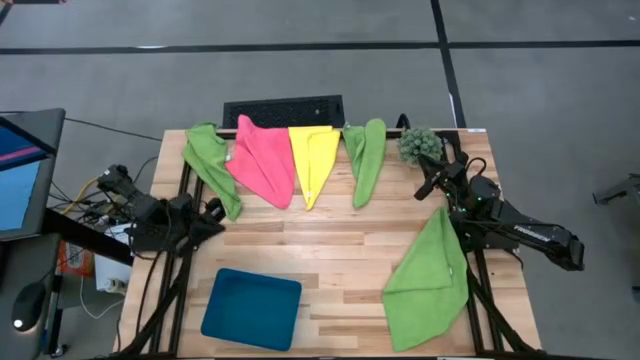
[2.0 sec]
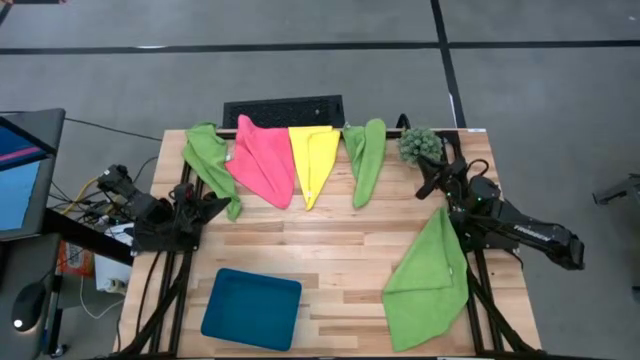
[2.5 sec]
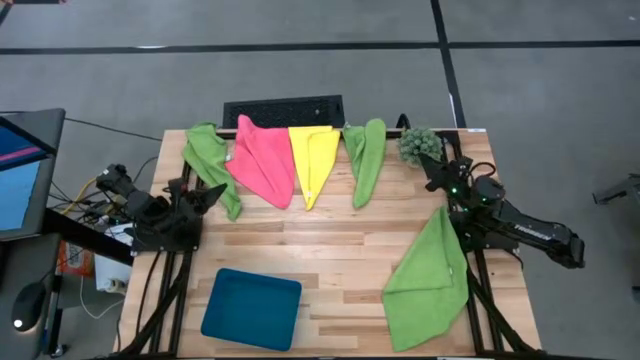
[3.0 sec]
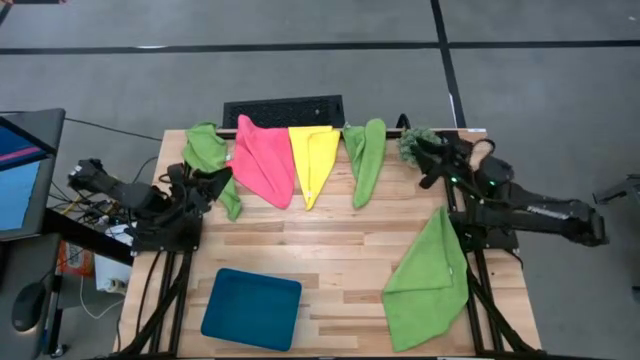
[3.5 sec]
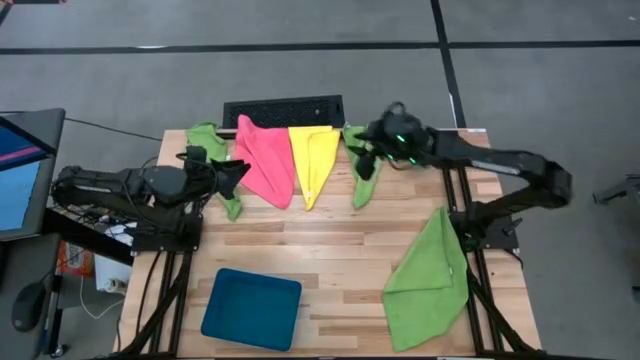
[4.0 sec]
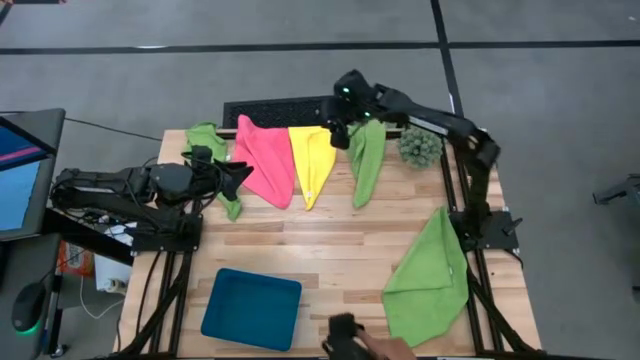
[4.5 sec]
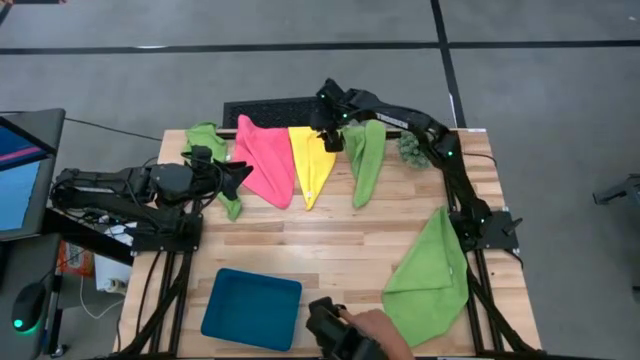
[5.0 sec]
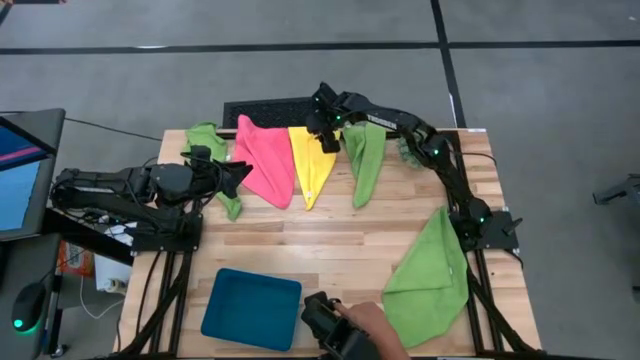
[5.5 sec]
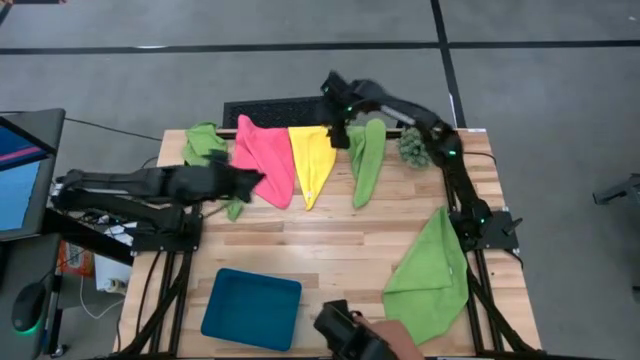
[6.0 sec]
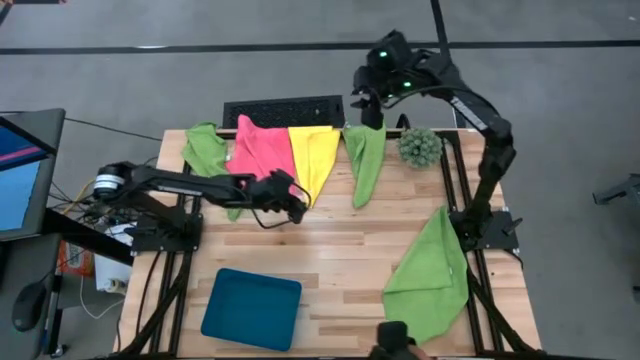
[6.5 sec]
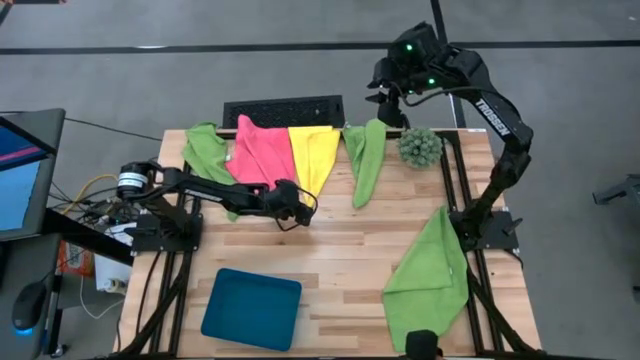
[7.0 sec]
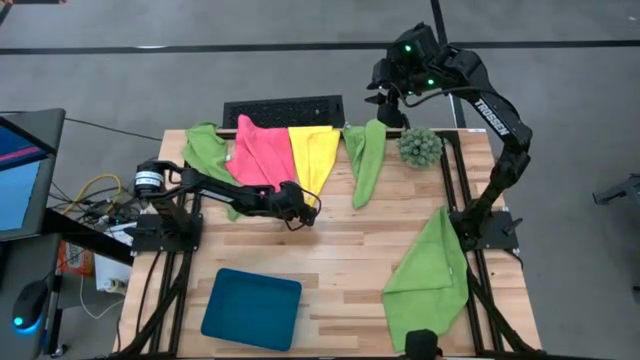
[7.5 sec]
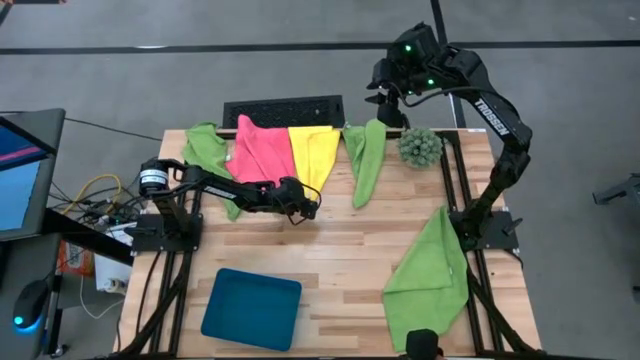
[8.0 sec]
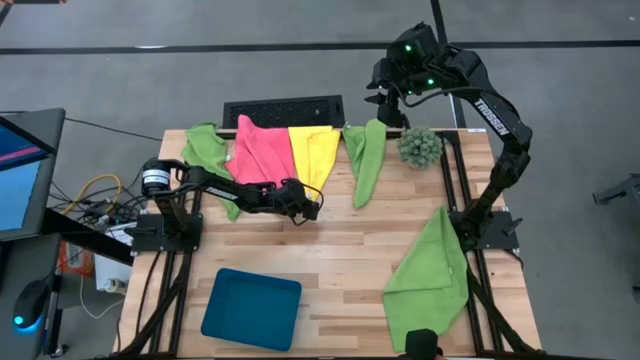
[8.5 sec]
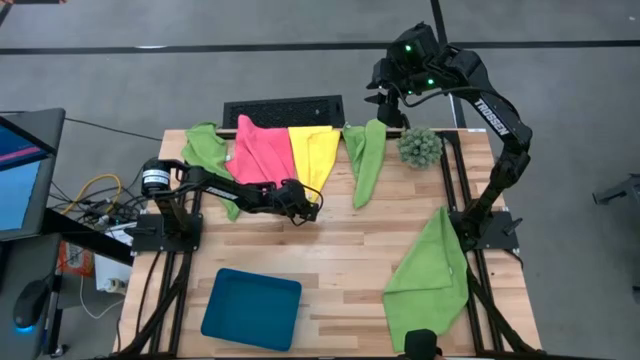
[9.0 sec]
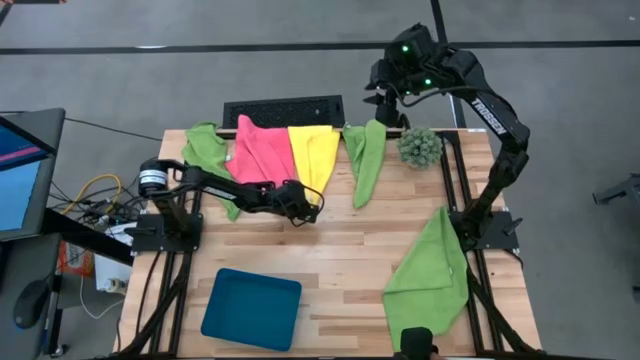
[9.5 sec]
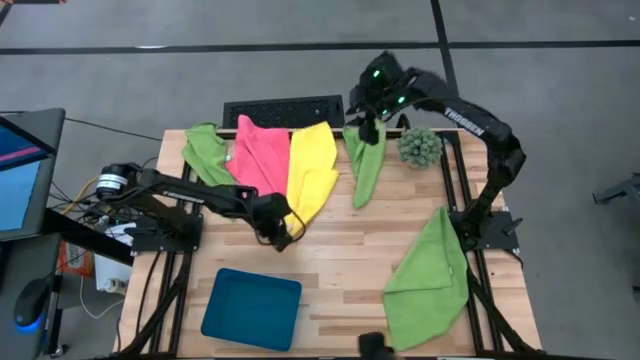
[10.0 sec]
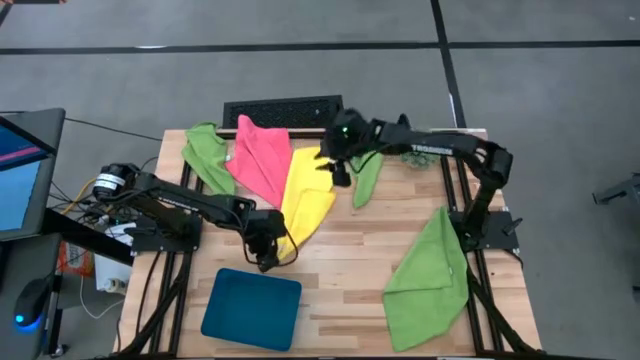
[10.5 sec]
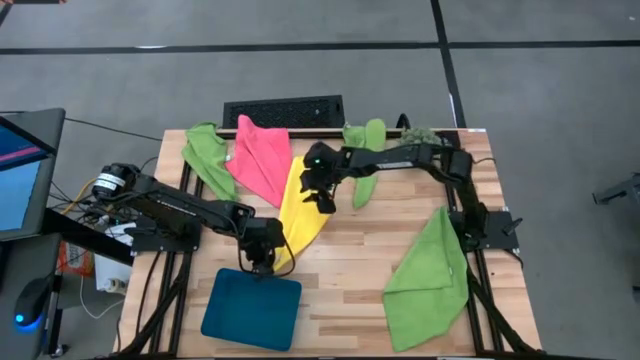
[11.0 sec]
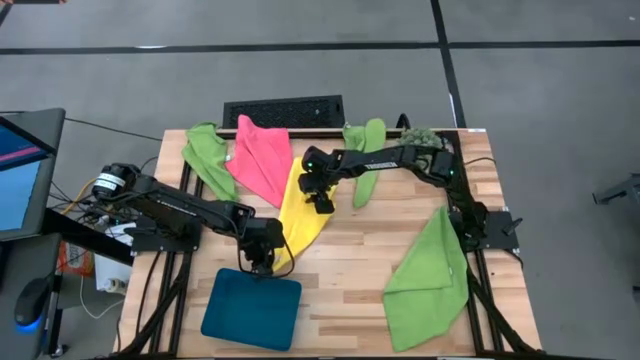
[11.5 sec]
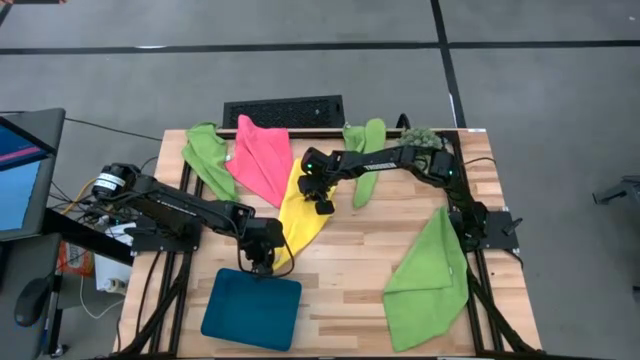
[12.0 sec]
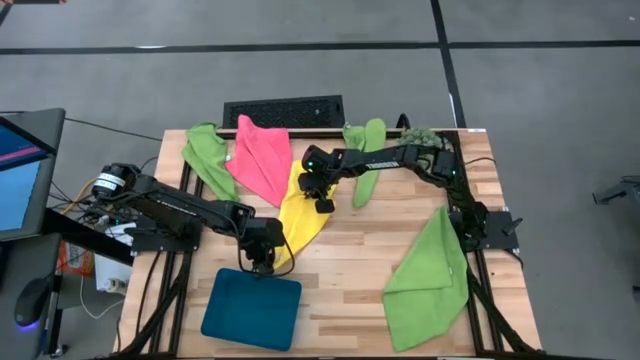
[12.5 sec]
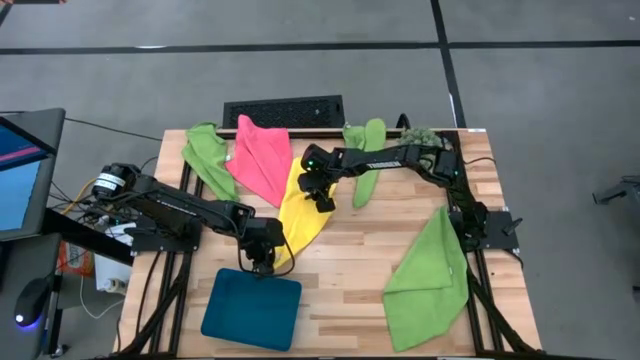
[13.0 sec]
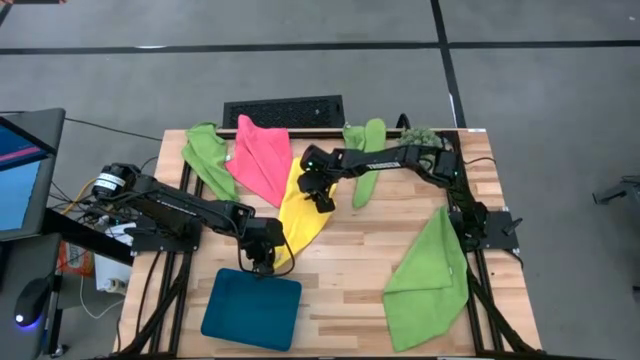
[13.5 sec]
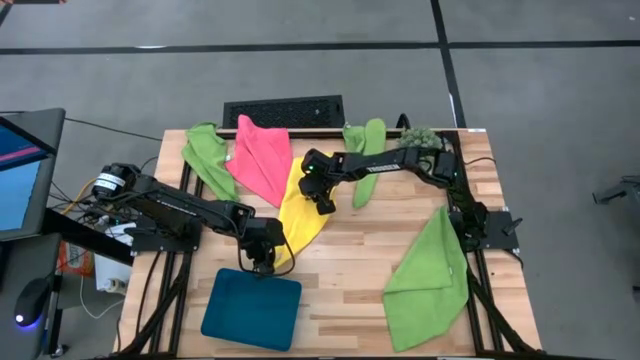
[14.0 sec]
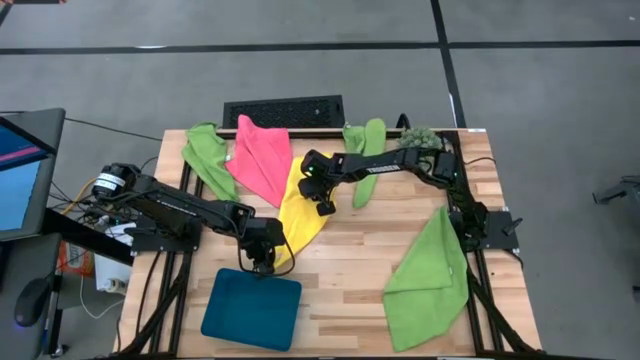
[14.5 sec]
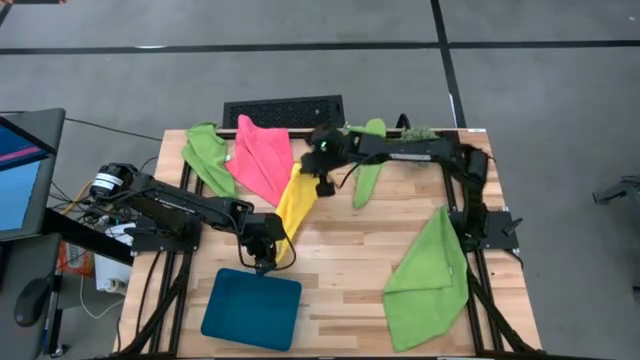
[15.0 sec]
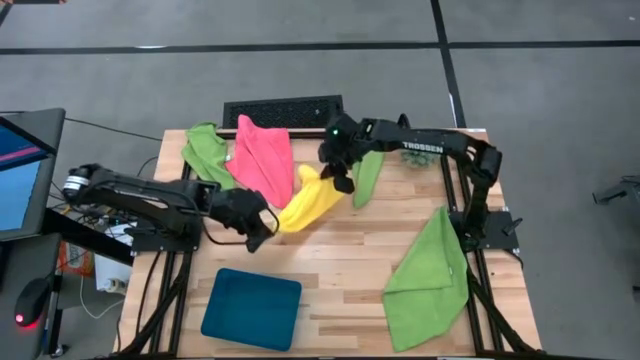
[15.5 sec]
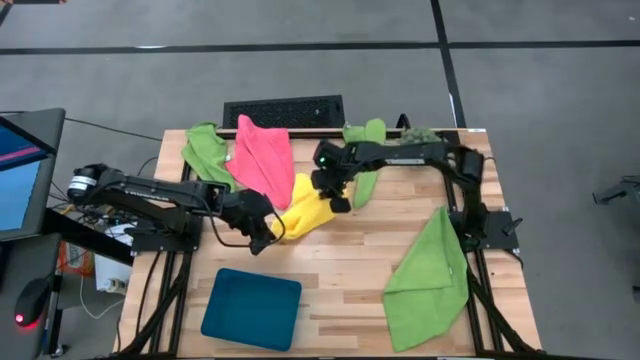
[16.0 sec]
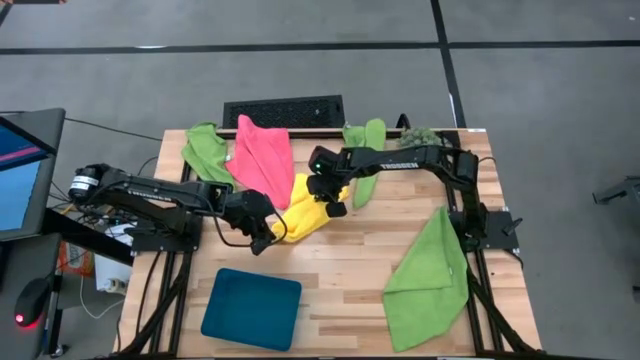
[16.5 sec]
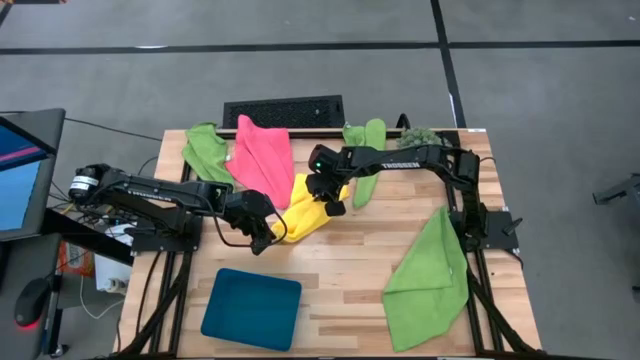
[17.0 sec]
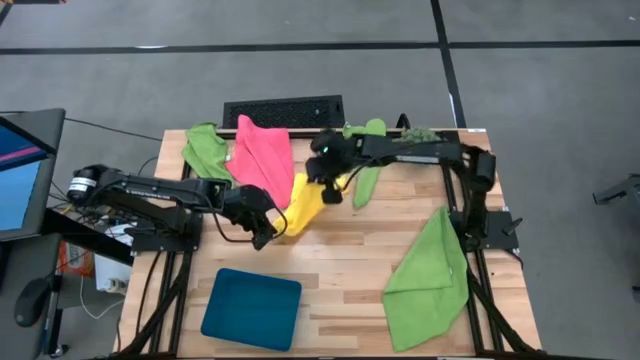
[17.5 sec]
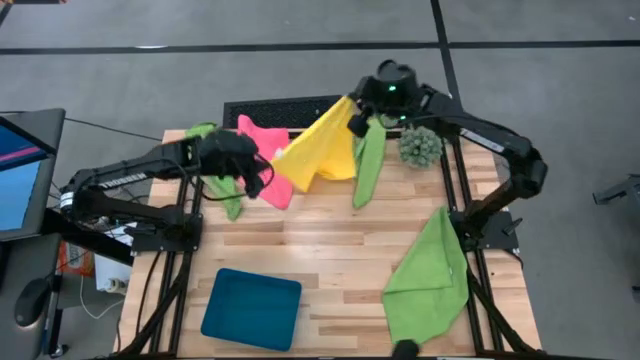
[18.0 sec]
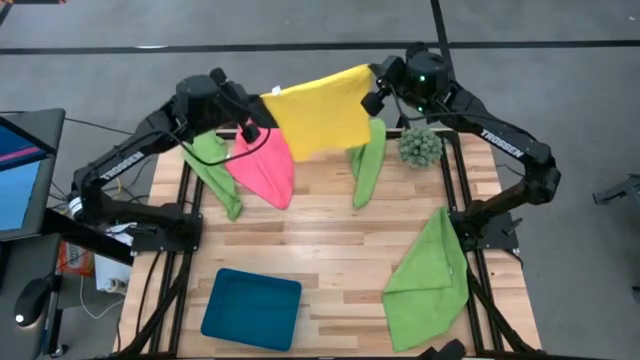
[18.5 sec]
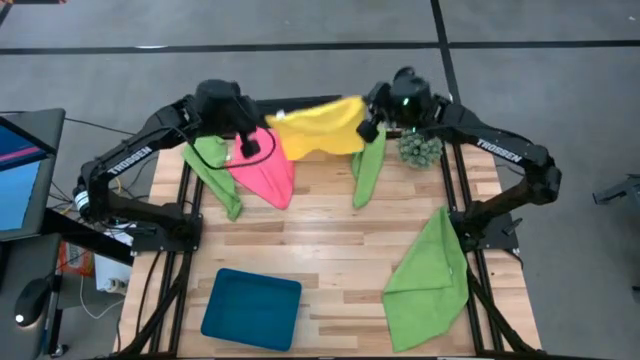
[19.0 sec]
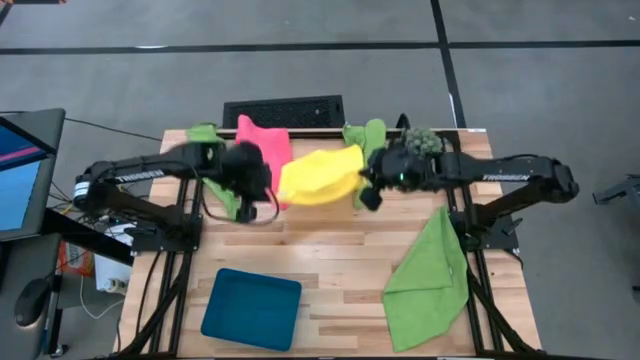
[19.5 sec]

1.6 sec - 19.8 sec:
Task: Fold microfiber towels
Fold the yellow microfiber towel
